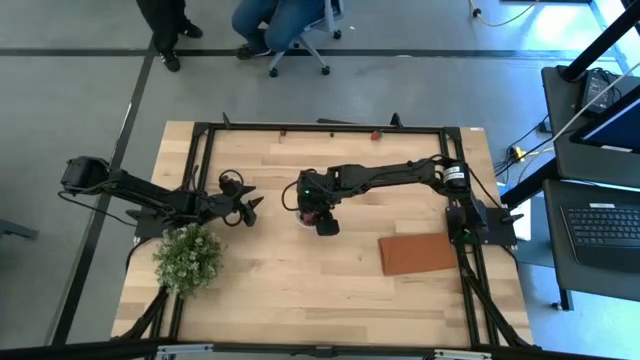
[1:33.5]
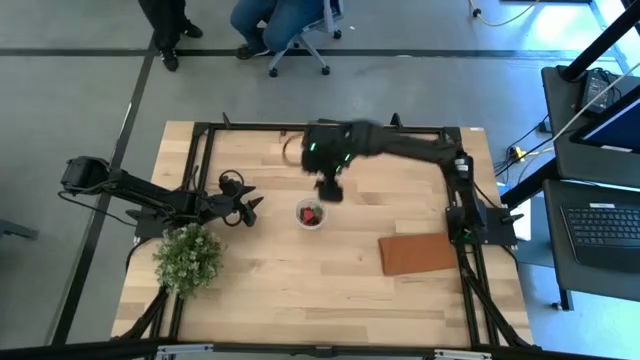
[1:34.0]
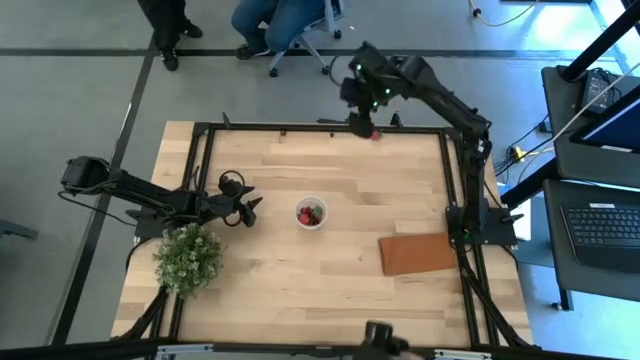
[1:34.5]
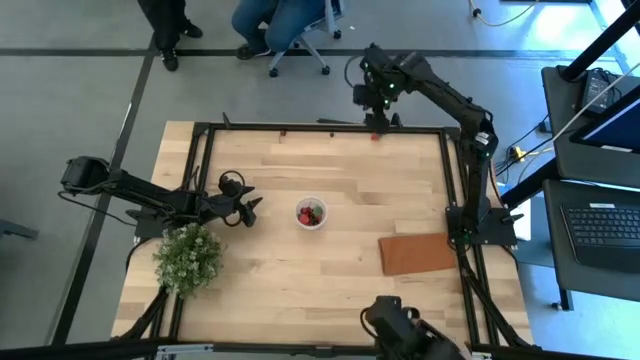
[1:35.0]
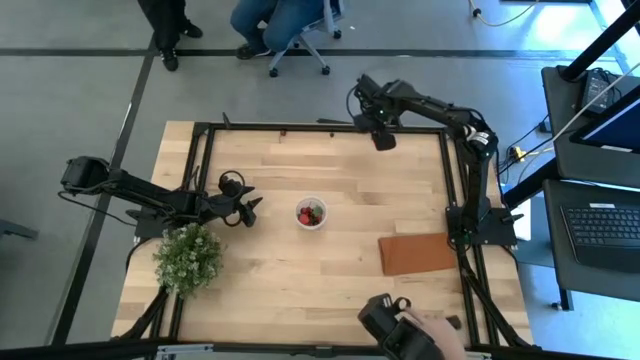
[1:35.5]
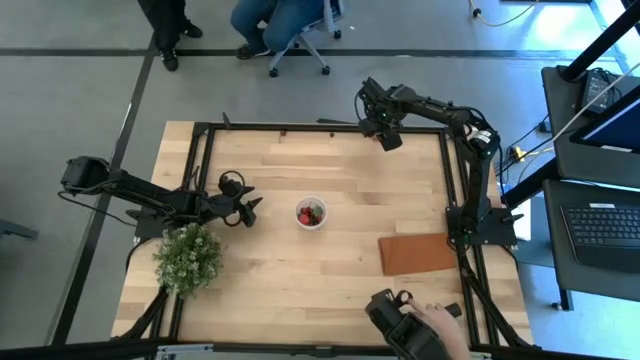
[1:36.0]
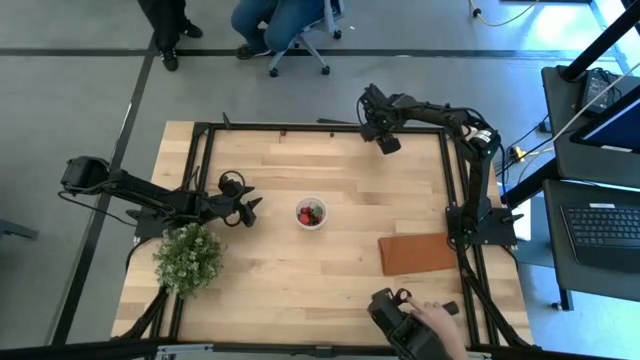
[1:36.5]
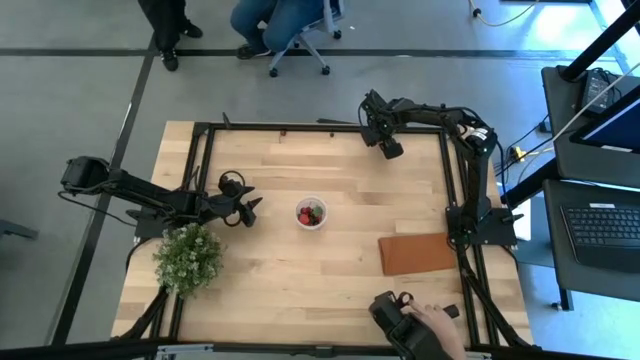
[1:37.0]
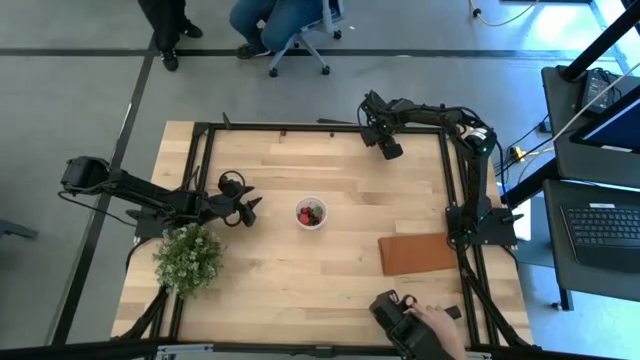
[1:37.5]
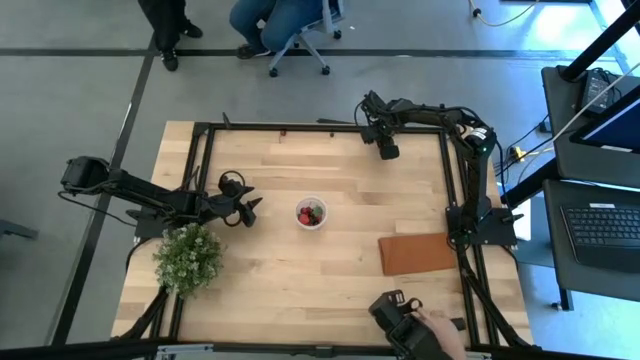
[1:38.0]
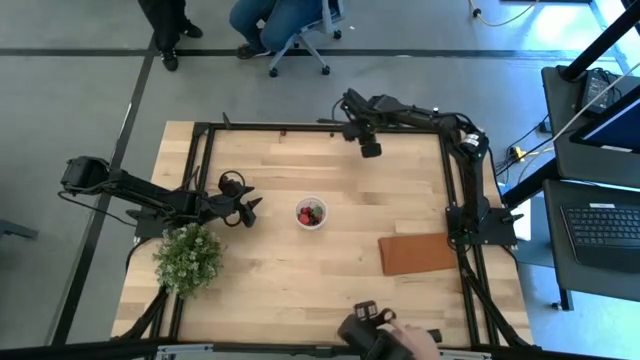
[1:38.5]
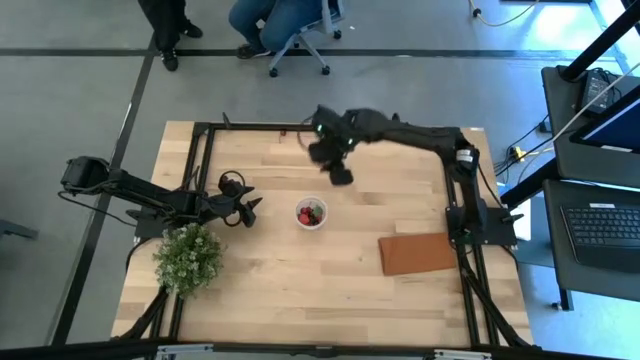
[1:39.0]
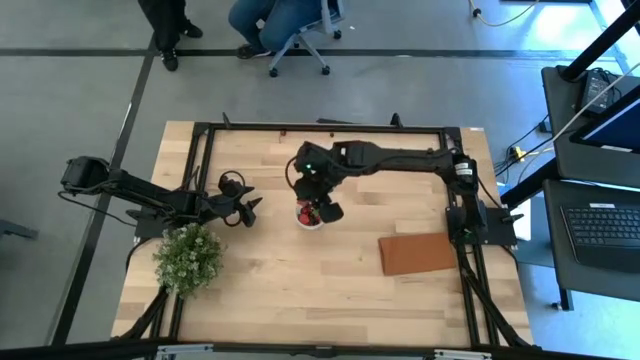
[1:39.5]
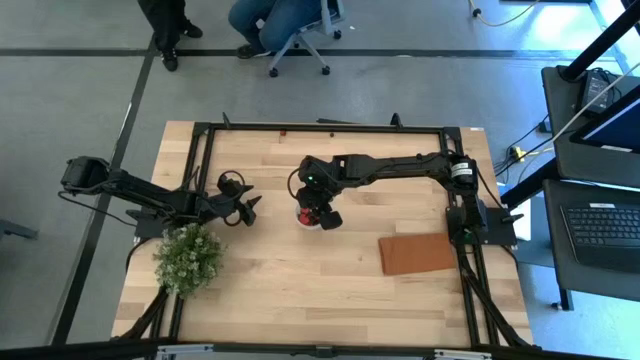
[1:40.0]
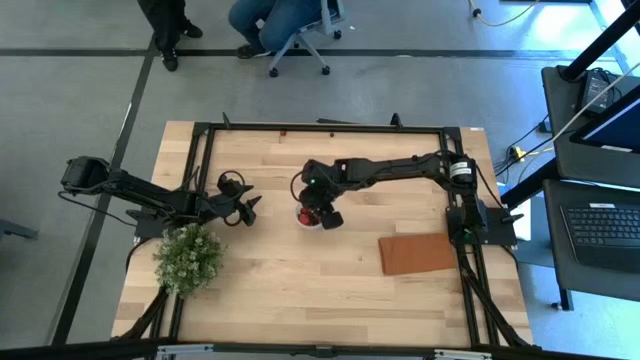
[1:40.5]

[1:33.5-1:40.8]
Task: Pick and placing Produce into tupperware
Put the strawberry into the bin

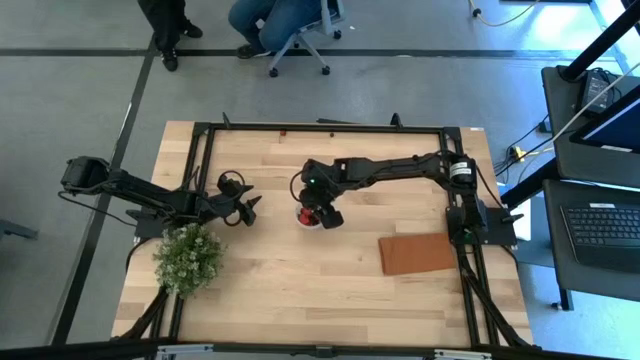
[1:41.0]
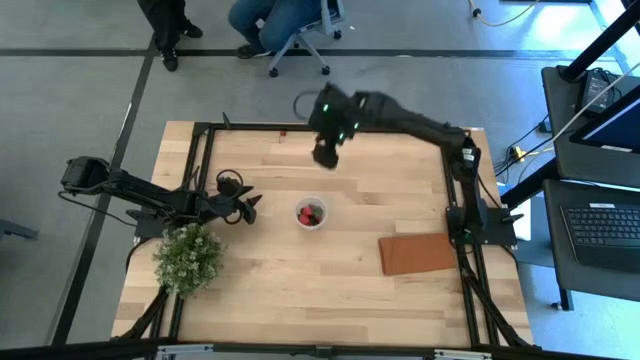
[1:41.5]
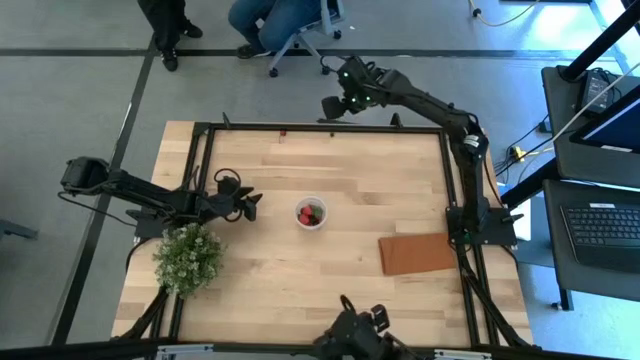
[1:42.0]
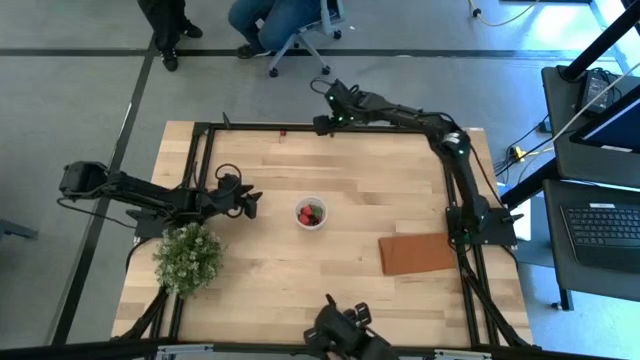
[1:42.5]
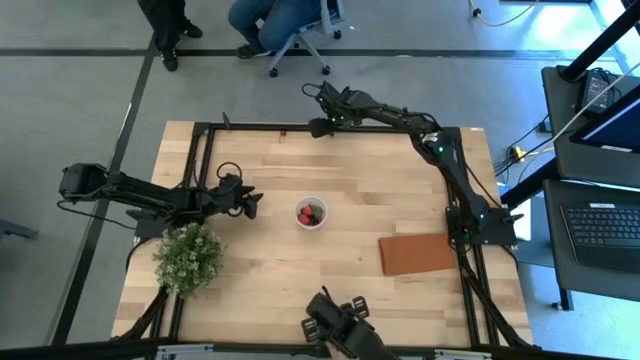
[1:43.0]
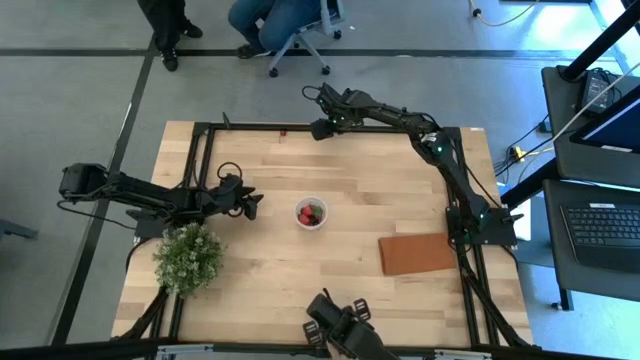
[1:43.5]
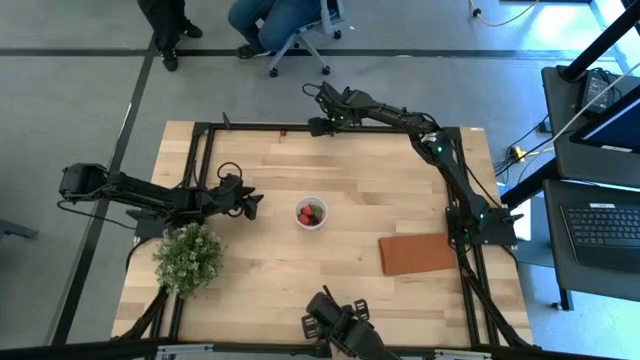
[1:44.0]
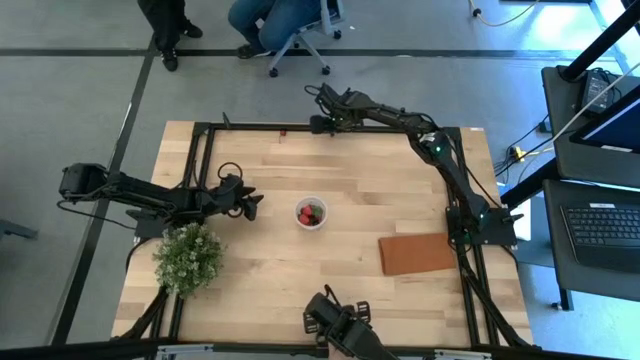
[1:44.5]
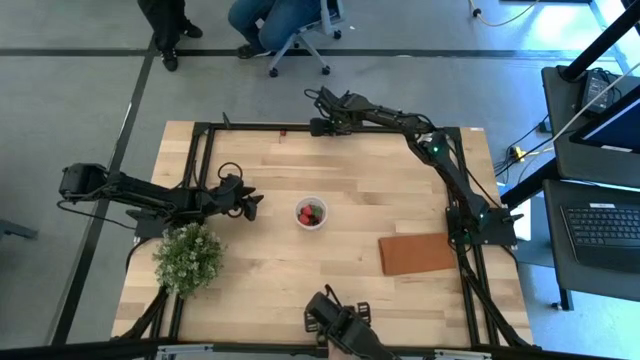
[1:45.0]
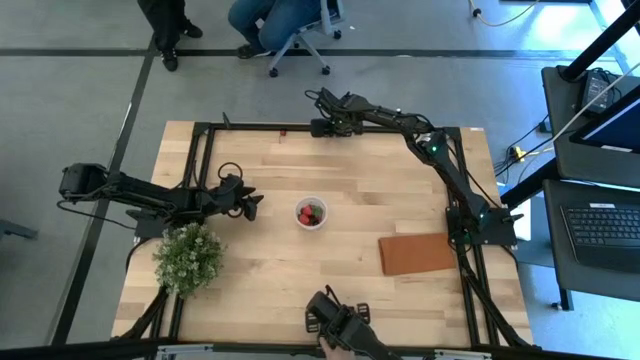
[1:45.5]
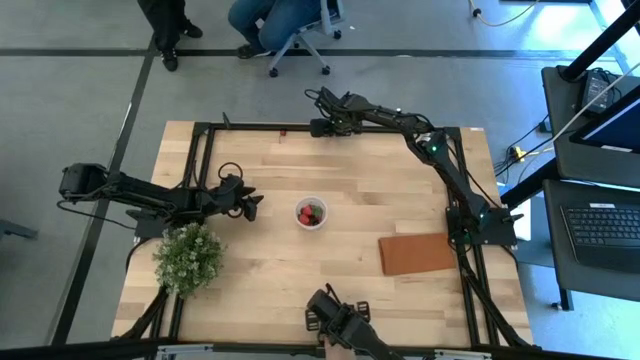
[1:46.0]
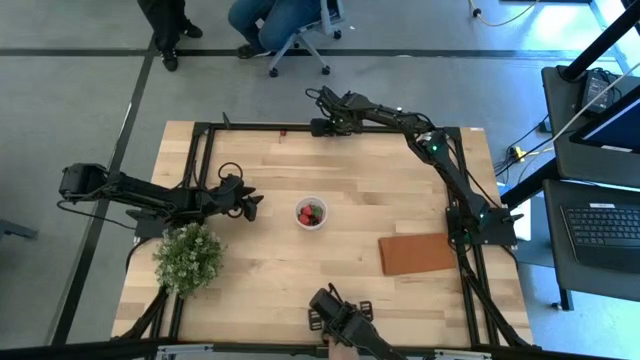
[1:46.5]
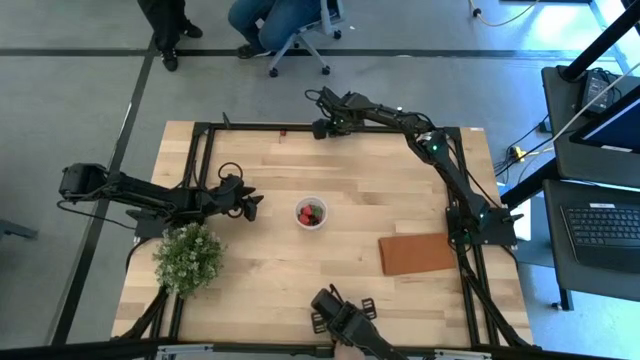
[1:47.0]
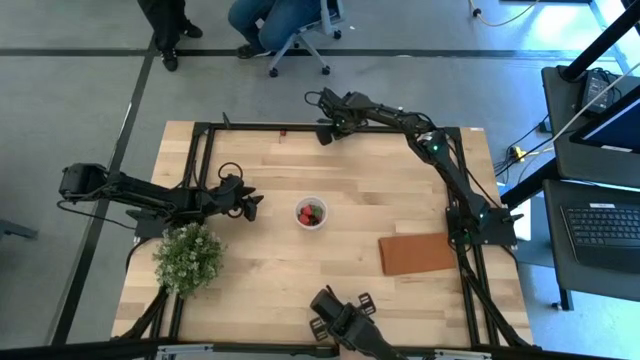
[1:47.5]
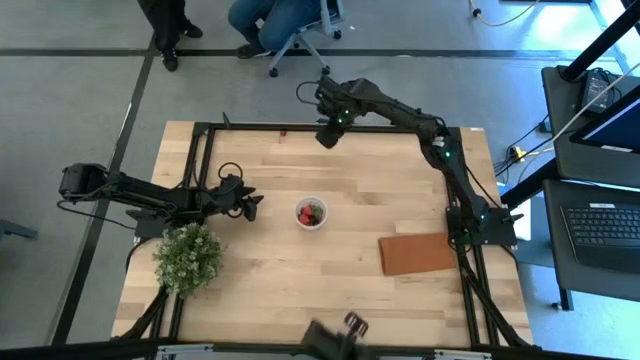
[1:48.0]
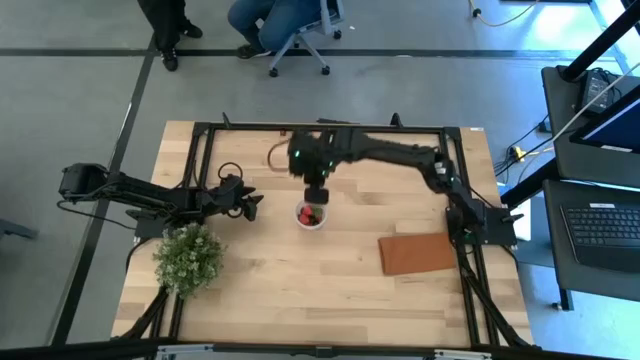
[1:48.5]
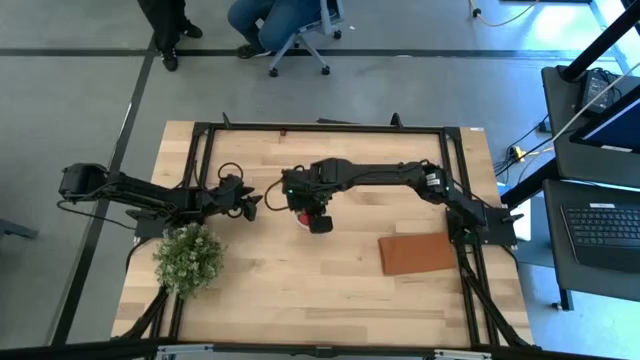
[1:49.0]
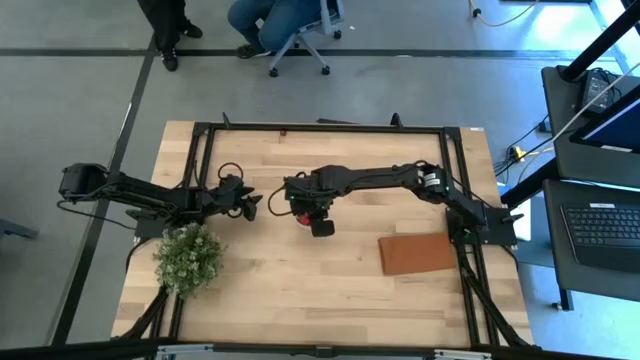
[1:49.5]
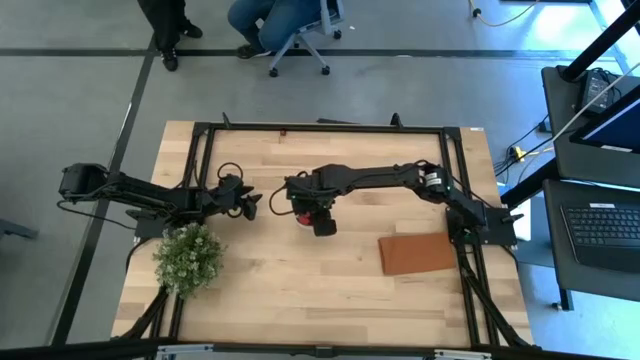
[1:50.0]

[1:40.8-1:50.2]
Put the blueberry into the bin

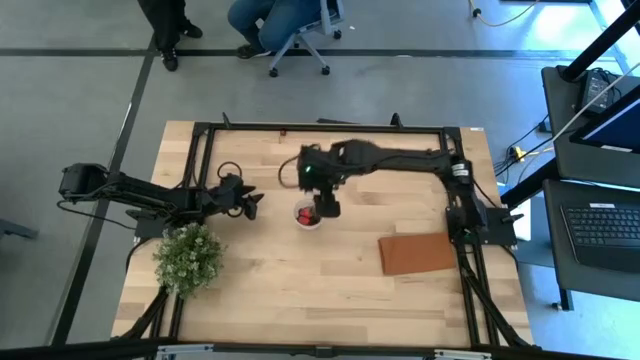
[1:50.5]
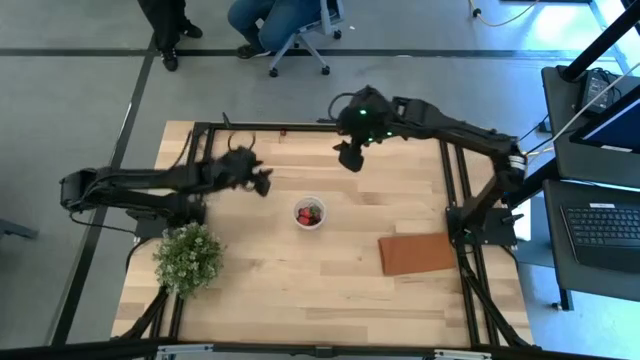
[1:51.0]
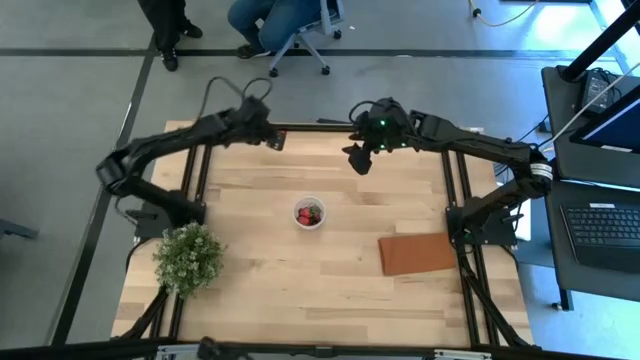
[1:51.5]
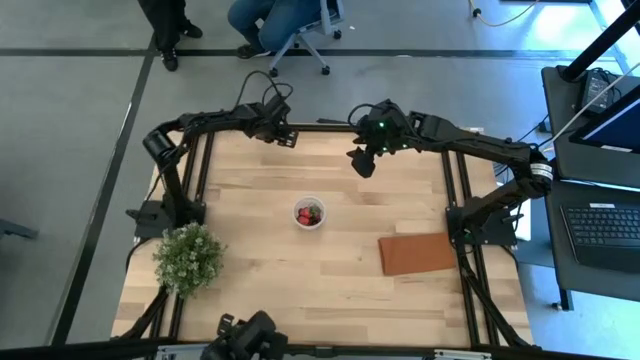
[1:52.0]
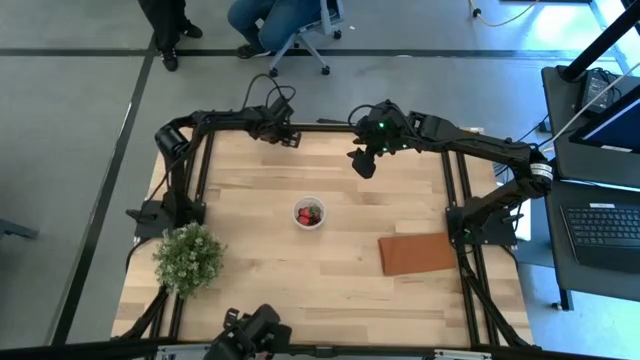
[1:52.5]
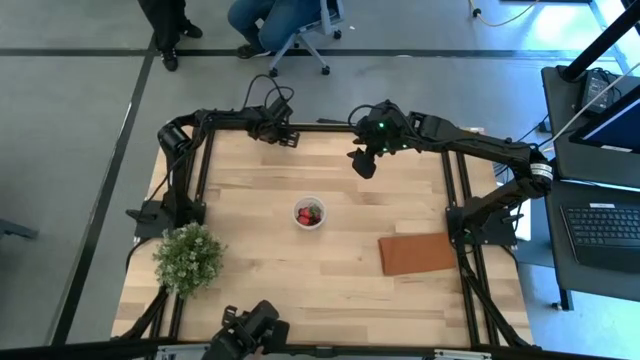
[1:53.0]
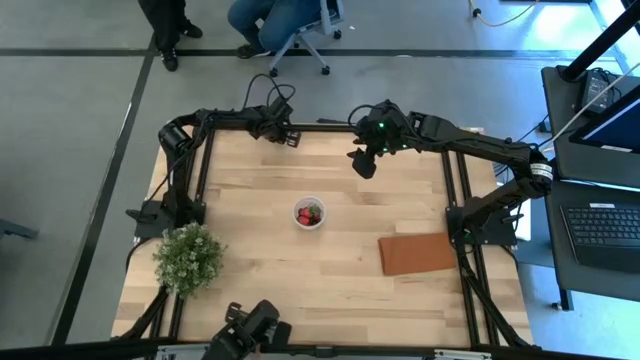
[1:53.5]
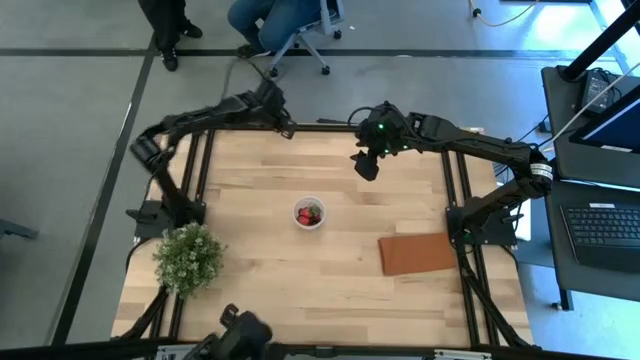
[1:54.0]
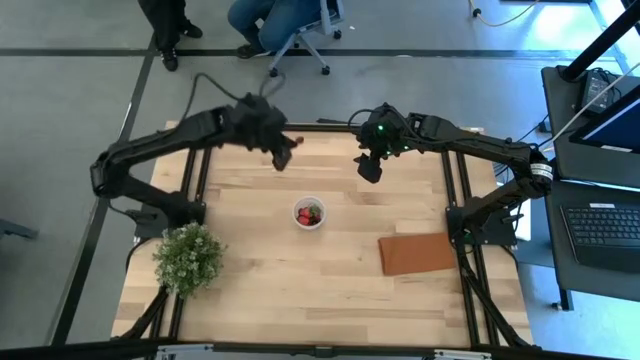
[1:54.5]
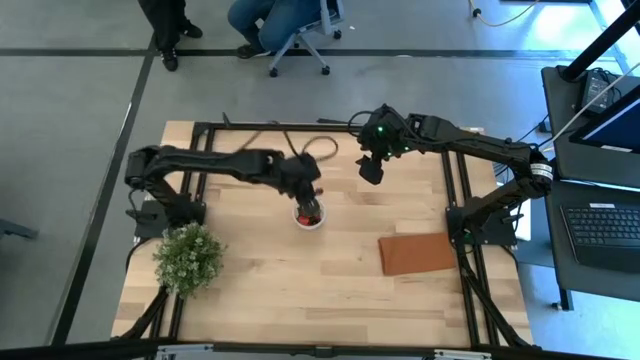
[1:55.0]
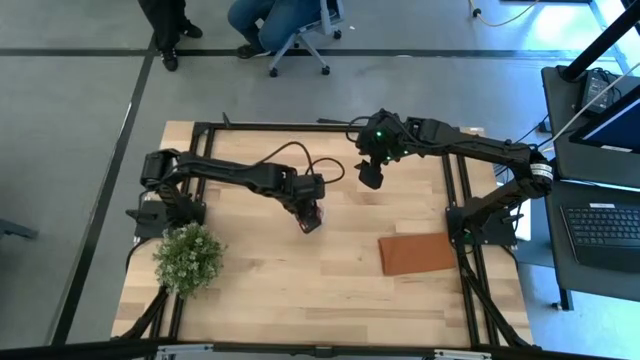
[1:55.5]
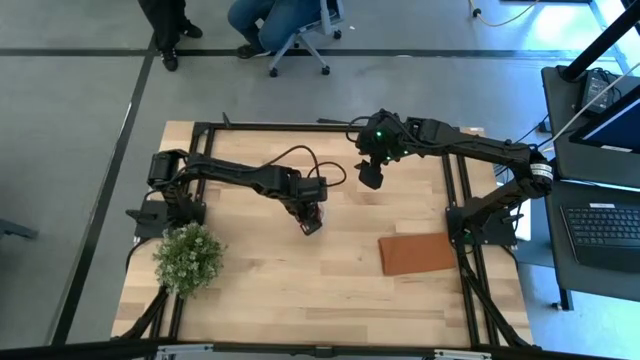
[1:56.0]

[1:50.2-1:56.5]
Put the red cherry into the bin
